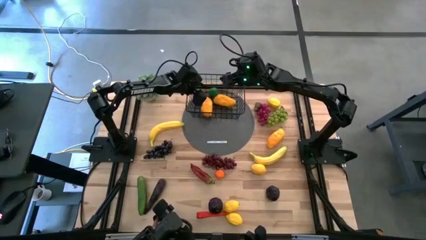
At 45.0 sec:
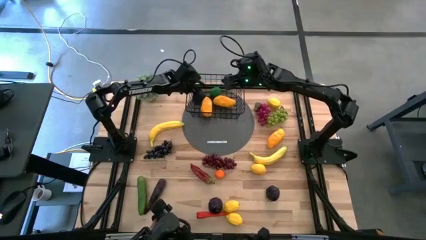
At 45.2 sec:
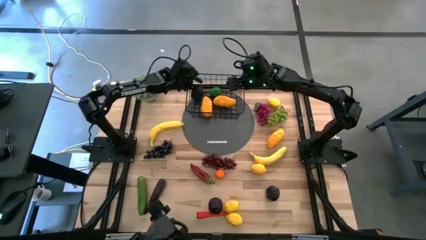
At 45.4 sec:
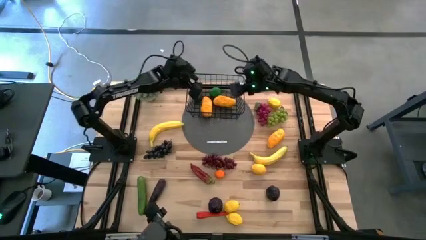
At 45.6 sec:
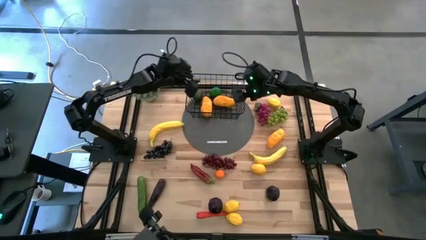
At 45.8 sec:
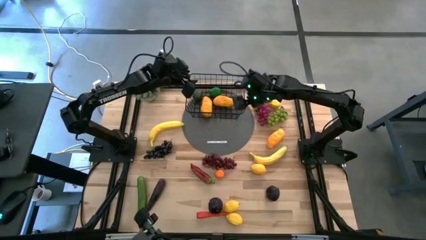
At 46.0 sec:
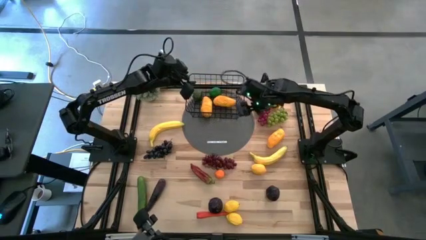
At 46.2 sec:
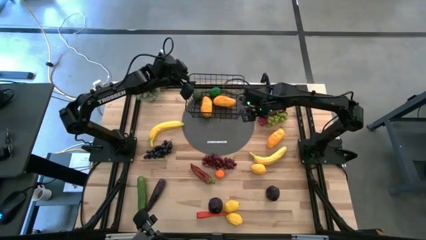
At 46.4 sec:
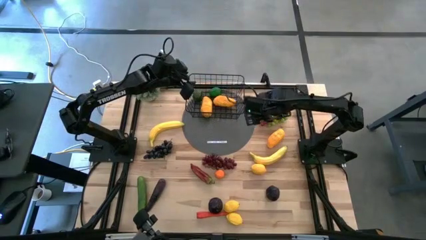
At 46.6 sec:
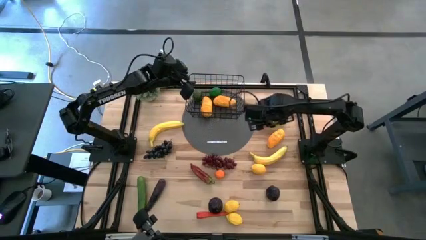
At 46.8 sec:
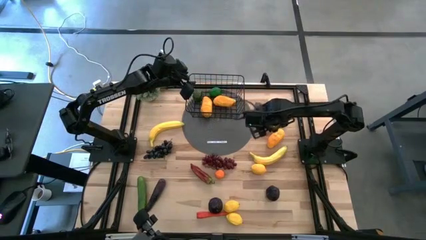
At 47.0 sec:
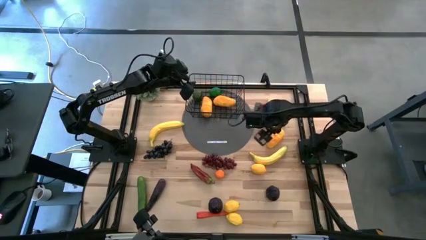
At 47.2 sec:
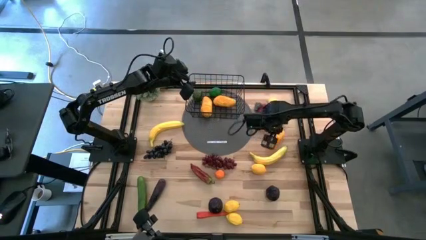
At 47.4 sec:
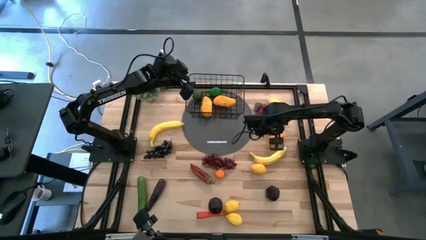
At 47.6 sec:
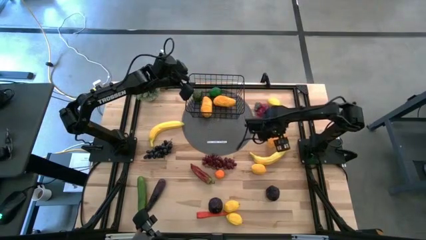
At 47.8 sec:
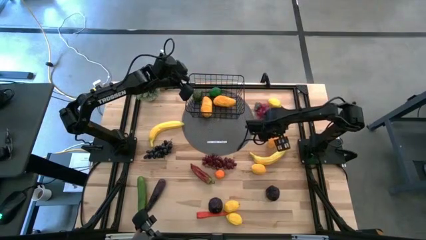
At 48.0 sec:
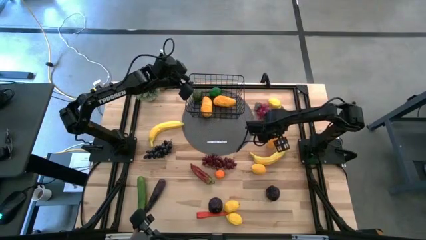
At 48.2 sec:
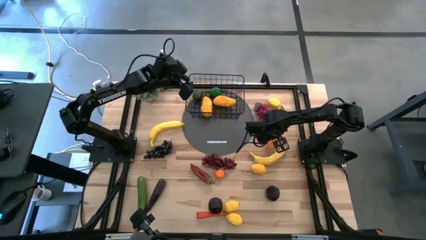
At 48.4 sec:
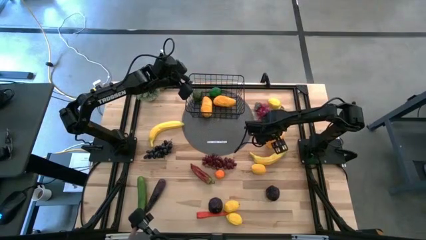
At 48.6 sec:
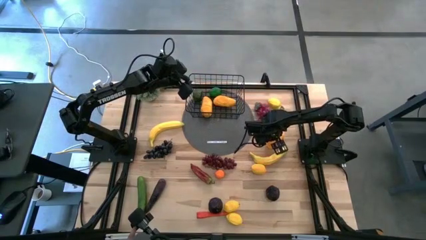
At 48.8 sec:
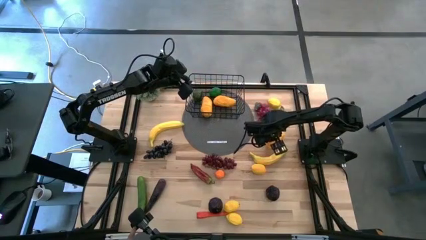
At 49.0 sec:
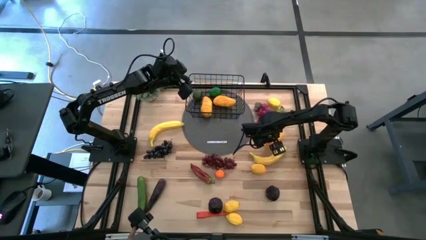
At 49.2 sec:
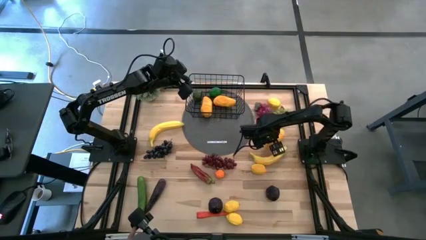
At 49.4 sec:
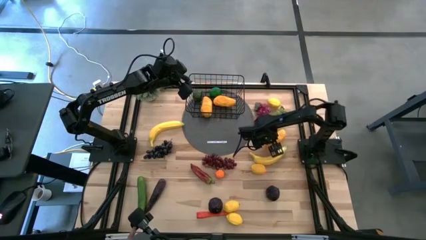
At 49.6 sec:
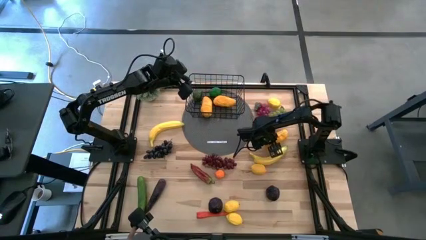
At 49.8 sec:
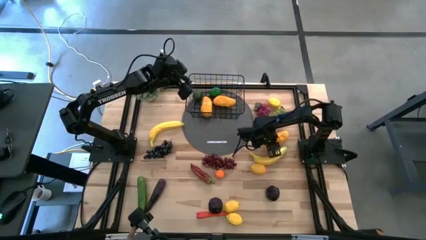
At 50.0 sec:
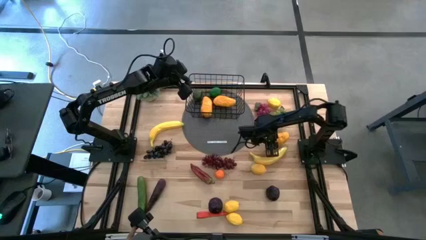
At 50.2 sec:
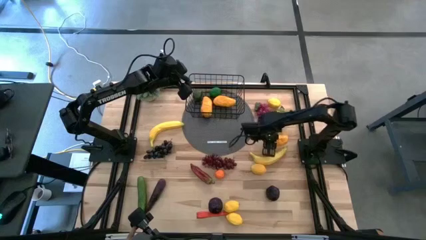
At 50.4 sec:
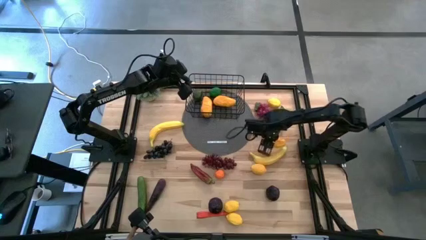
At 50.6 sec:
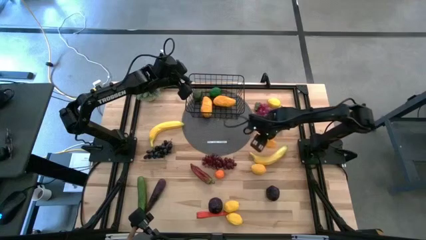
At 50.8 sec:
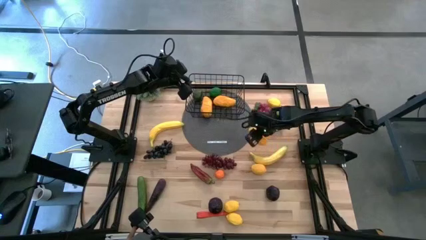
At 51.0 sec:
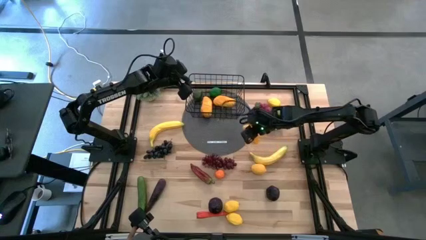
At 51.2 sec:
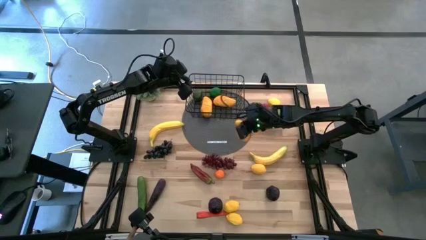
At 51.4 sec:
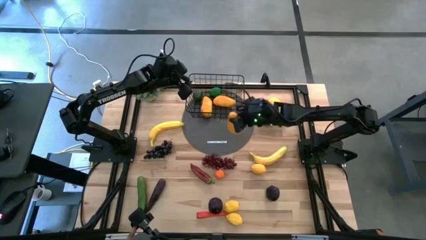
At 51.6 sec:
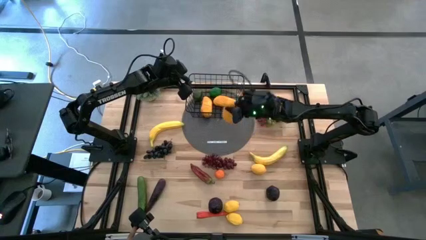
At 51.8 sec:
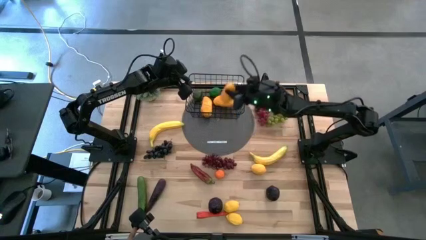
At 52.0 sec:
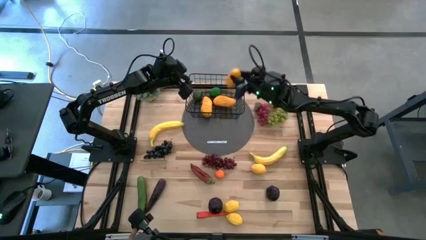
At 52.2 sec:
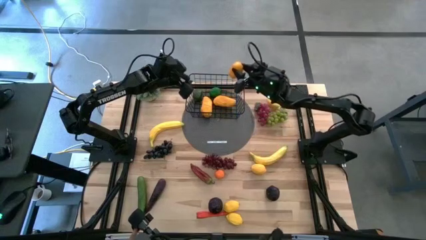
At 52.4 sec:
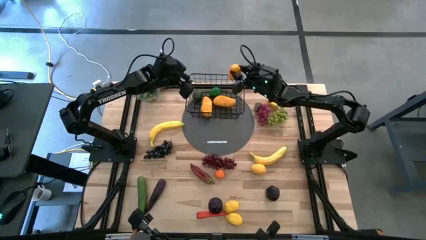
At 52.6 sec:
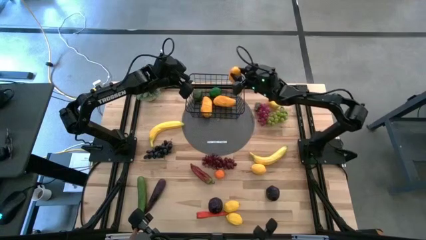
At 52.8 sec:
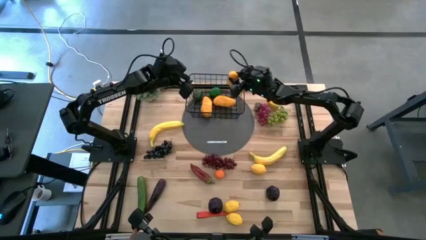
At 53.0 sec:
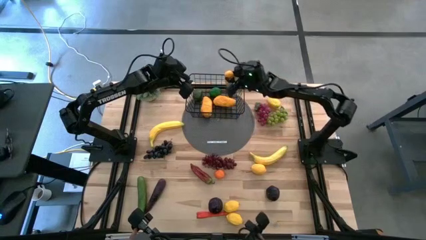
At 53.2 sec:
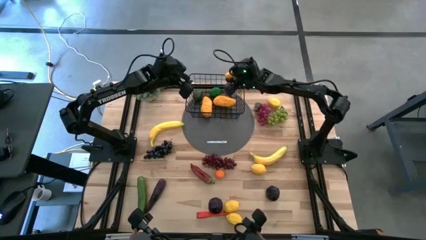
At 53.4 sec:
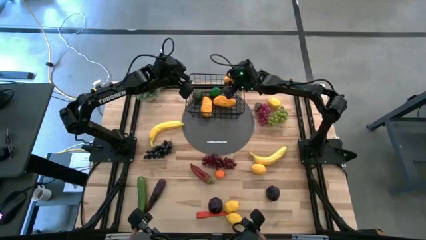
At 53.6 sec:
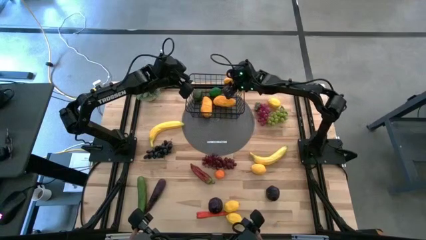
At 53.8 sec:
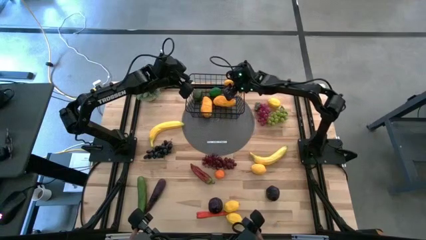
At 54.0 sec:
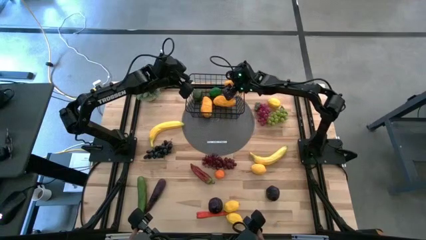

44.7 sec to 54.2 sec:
Task: Build produce basket
Put the yellow mango into the black wire basket
